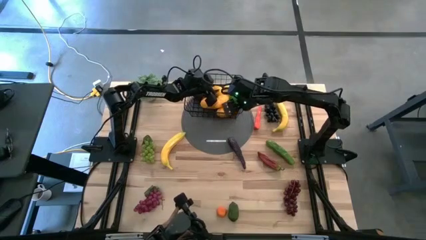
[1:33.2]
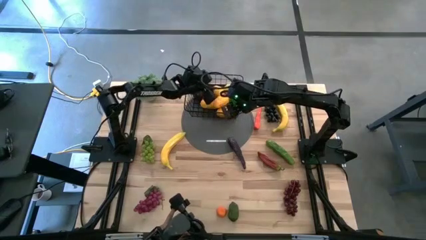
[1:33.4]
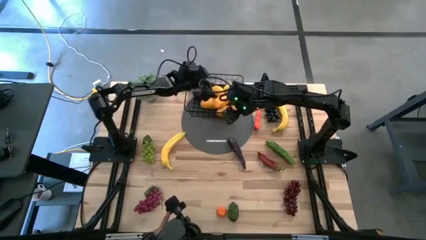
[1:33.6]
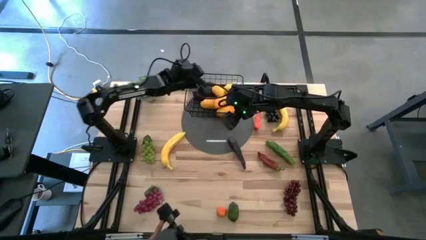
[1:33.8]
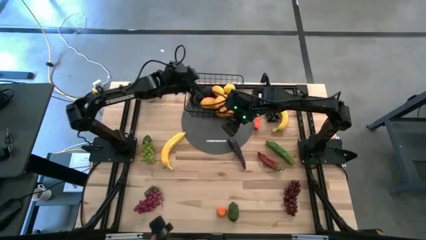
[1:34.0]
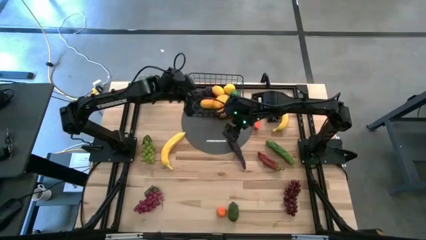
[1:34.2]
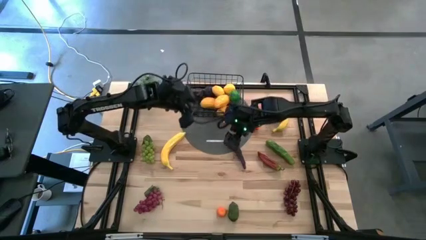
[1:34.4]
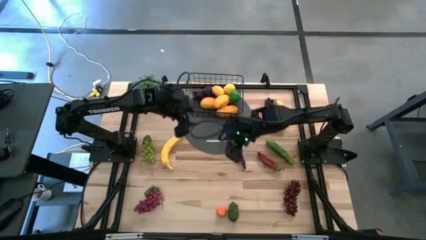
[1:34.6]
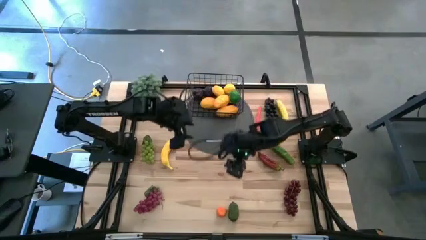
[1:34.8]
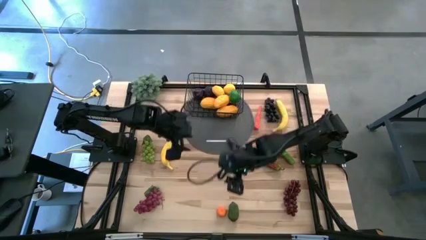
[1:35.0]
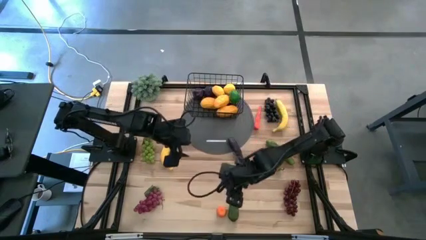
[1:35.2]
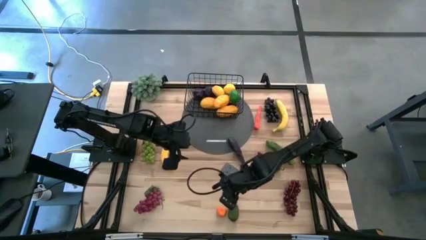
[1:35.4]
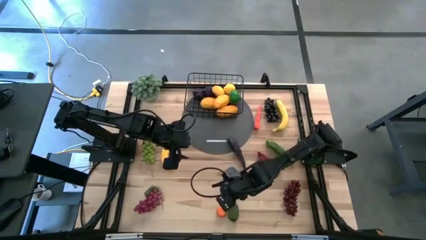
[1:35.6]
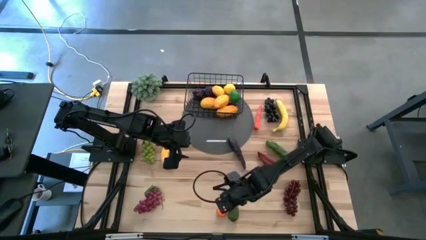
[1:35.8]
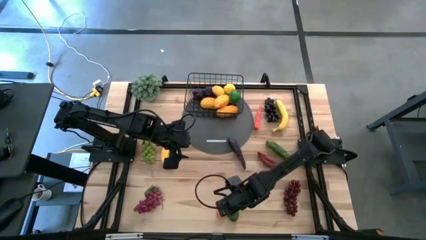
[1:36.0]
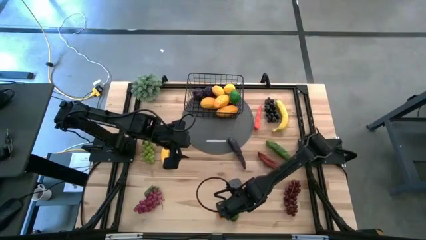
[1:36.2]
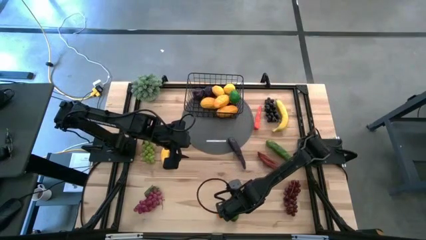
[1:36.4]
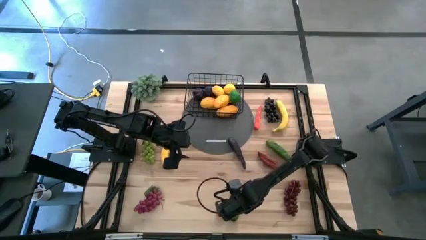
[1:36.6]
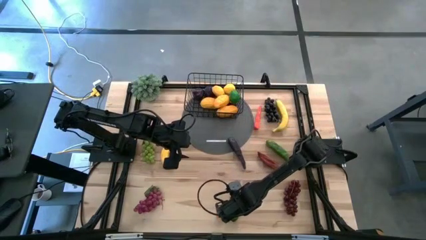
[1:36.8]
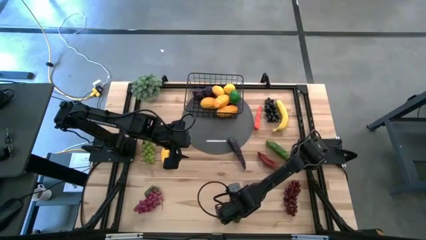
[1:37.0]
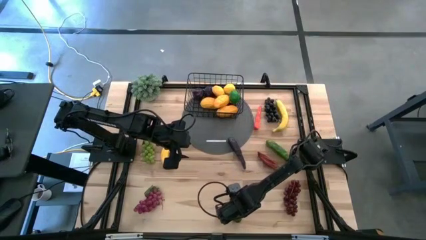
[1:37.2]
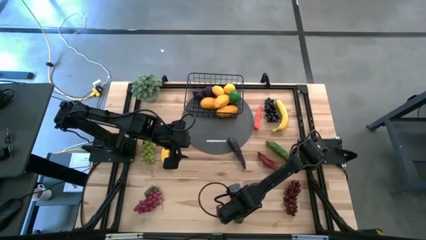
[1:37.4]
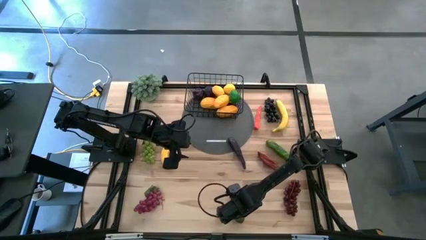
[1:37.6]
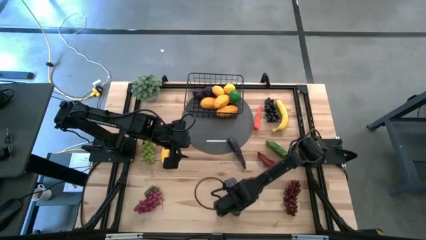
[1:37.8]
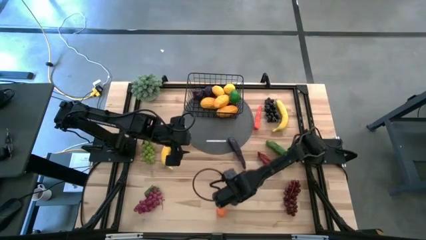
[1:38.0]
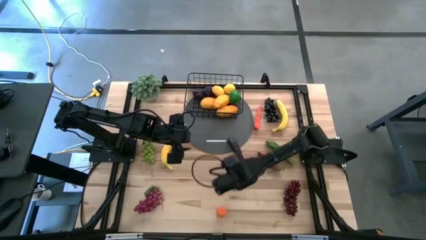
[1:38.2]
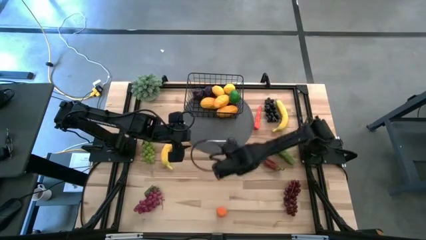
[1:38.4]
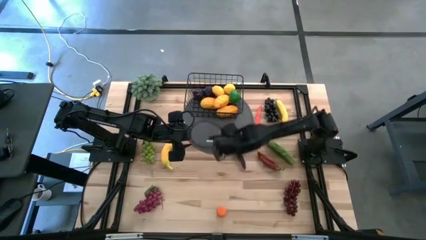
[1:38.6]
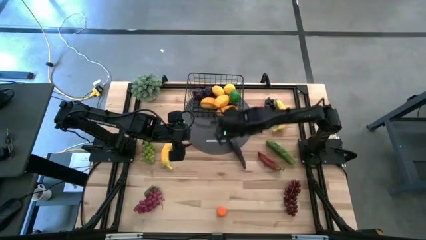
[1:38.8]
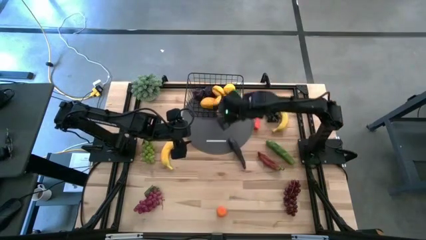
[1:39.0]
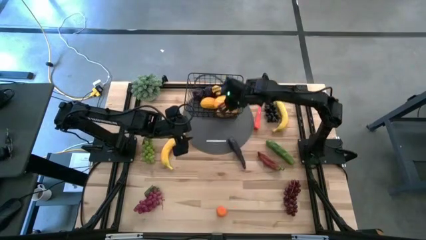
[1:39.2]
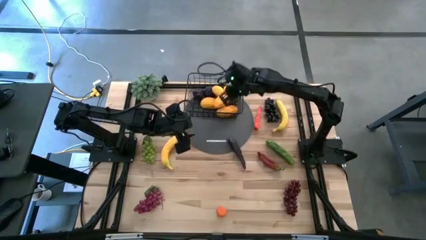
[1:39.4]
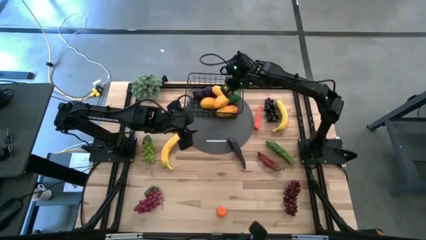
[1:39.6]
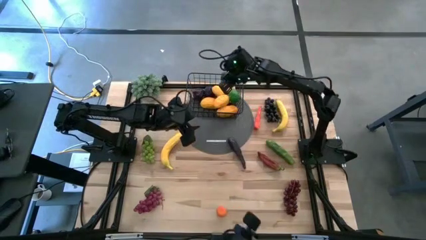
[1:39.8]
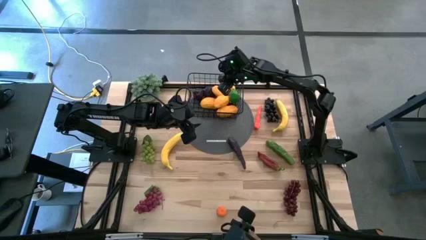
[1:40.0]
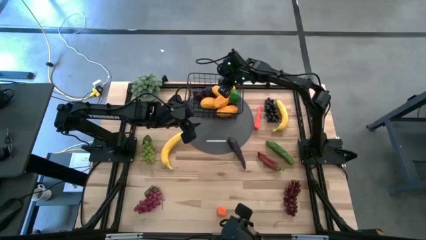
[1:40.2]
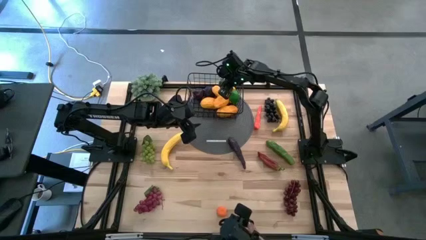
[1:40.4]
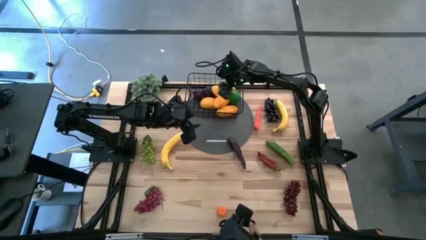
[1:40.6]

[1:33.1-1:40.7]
Task: Build produce basket
Put the lime into the black wire basket

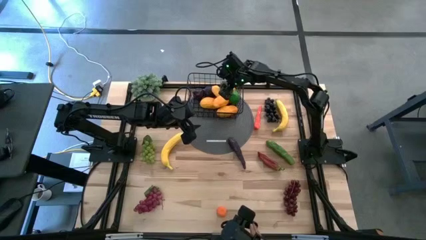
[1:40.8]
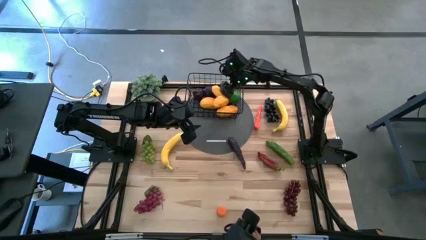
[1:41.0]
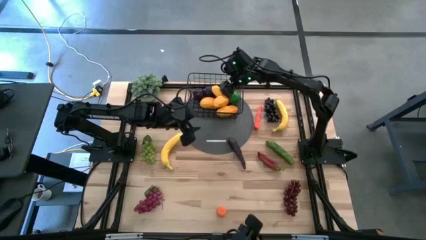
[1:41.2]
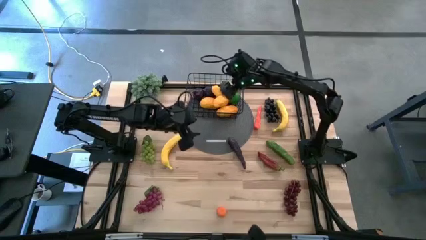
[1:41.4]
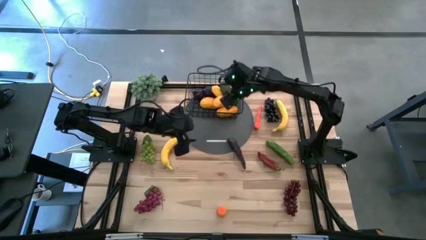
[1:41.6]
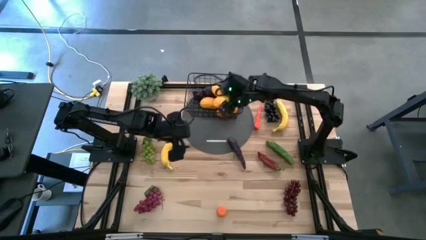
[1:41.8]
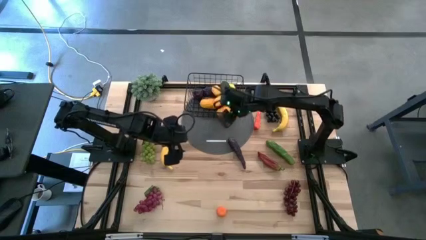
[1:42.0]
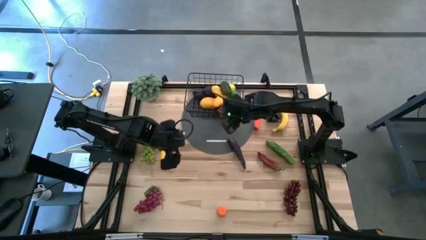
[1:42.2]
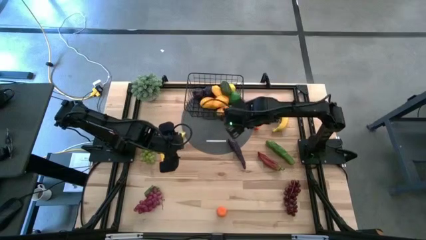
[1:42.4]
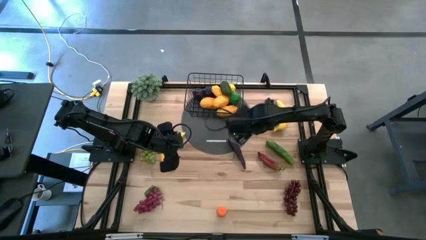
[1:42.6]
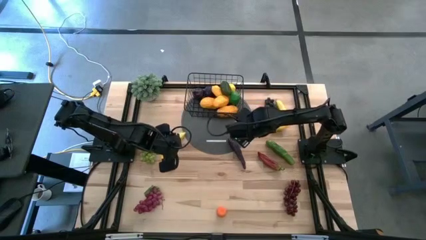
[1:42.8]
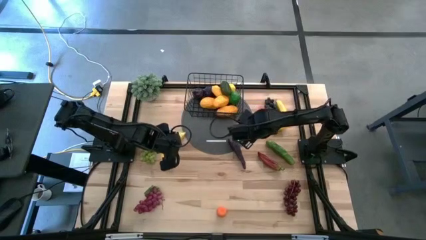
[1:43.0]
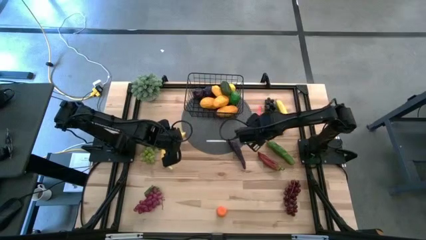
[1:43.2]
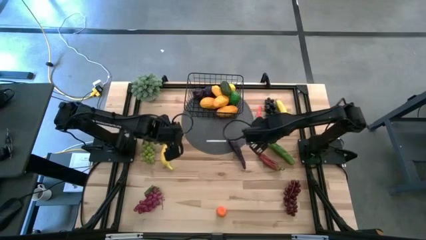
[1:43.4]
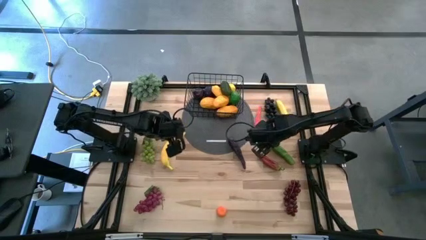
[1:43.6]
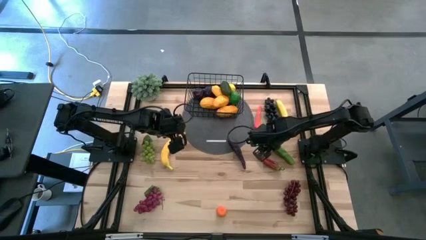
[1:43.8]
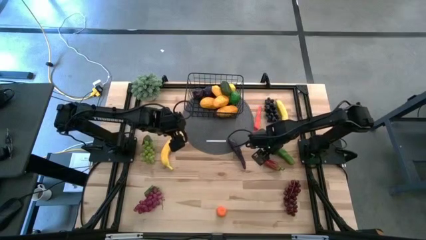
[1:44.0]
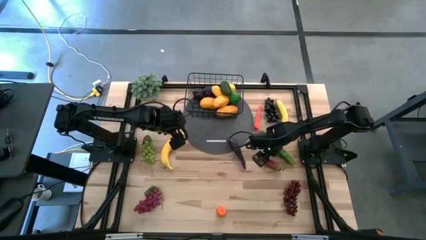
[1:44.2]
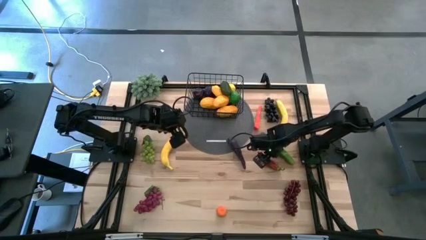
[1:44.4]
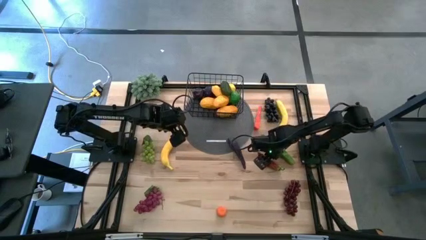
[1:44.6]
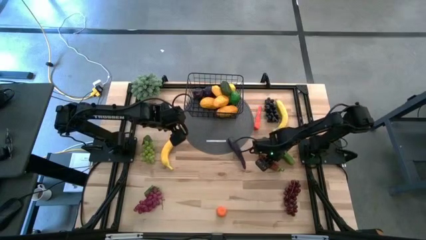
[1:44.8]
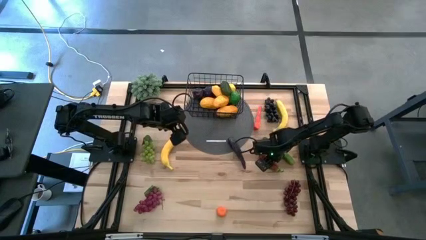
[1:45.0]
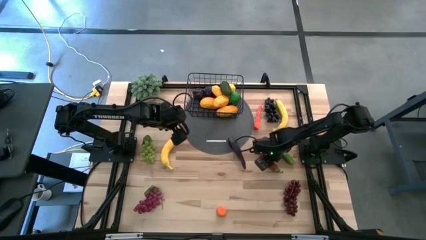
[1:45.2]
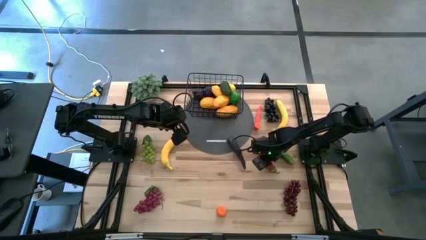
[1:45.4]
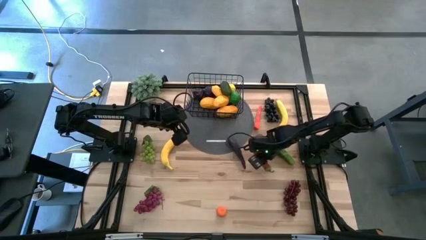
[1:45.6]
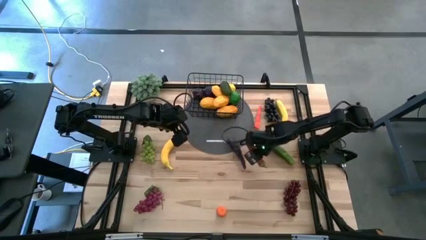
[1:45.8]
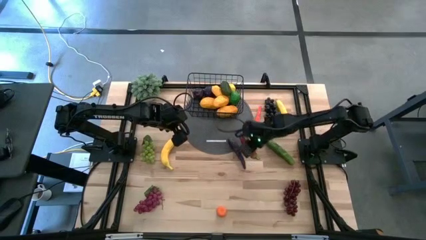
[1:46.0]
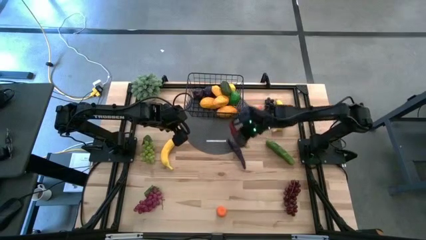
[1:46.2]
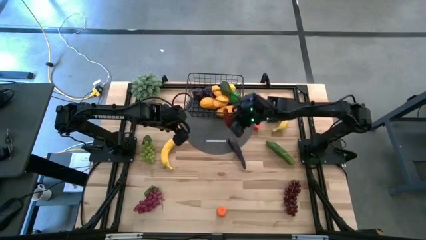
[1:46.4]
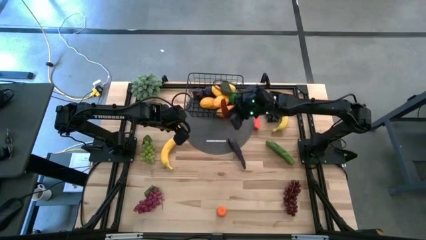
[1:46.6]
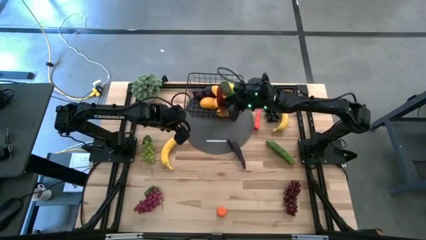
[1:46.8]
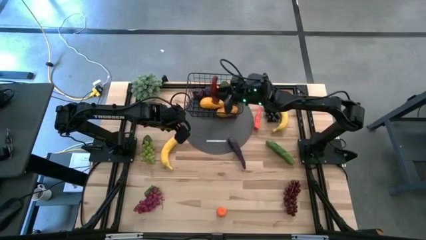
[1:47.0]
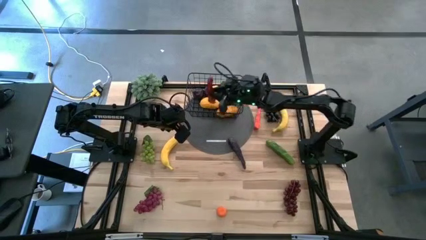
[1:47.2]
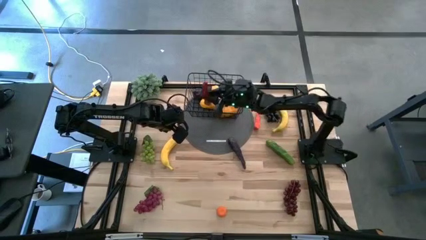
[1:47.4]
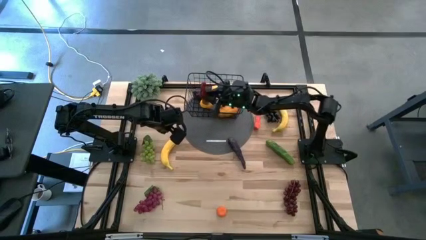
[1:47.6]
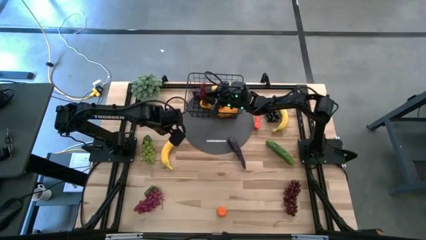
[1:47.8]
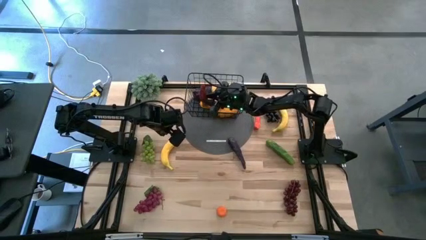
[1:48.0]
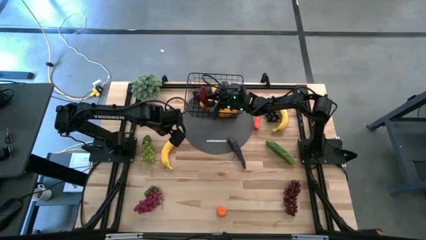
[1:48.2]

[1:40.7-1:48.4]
Put the red chili pepper into the black wire basket
